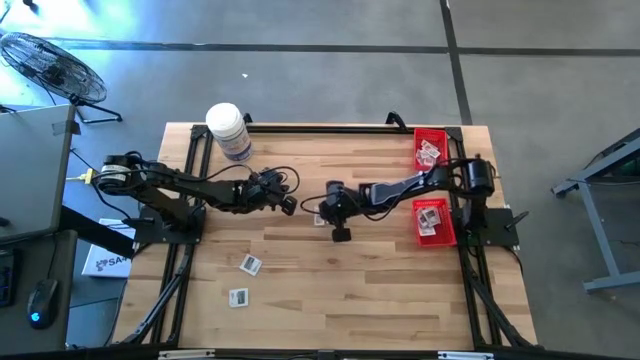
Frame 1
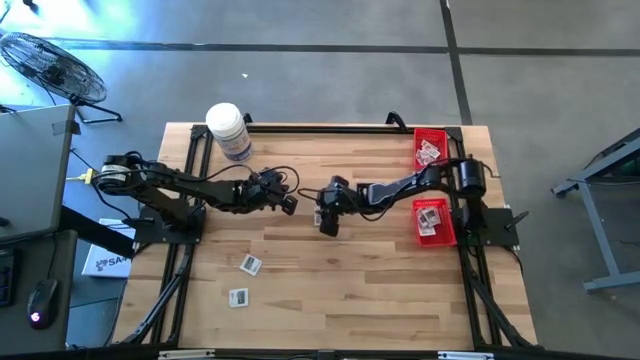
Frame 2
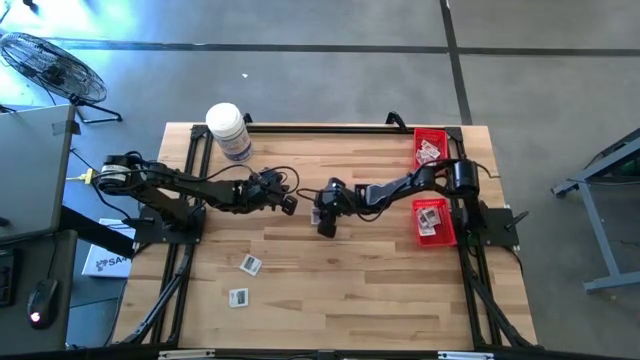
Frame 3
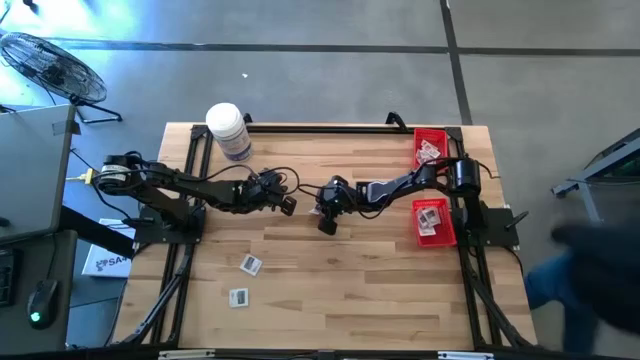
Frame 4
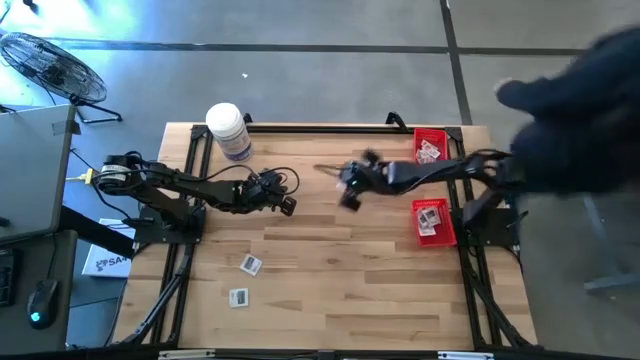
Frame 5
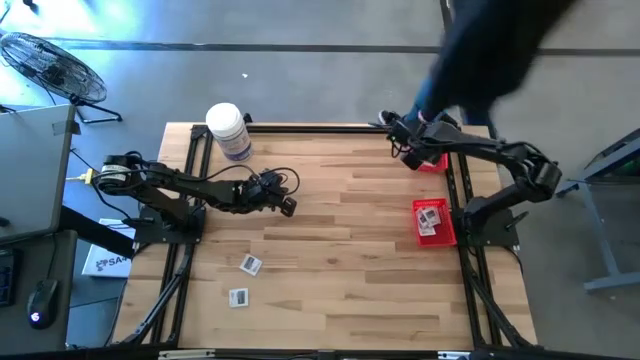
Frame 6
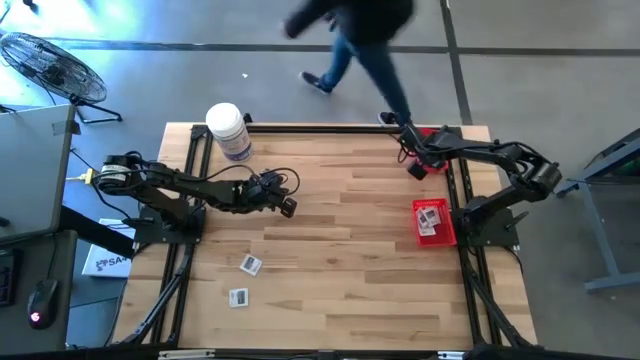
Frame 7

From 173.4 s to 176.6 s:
Task: Pick & Place First Aid Supplies
Put the ointment pack into the top basket

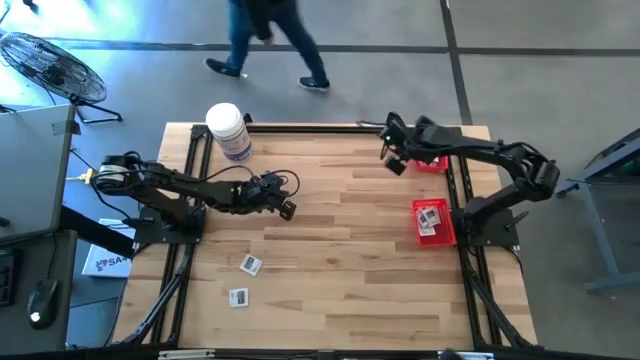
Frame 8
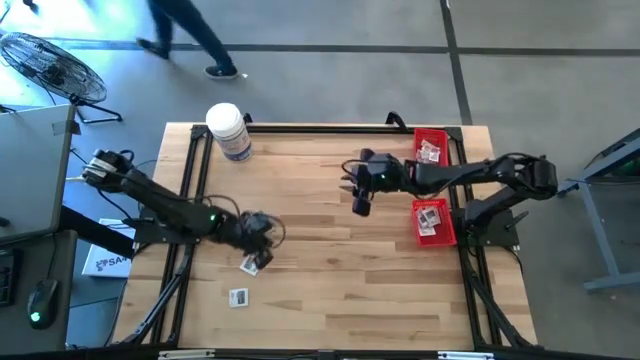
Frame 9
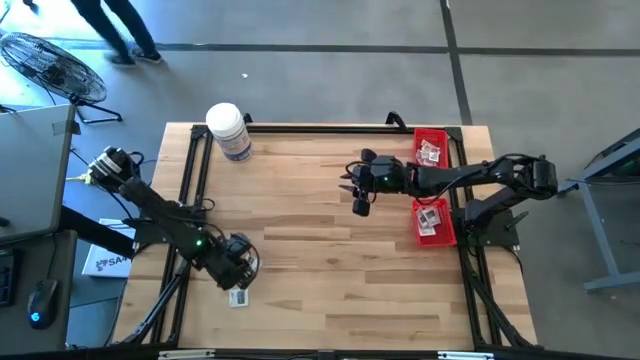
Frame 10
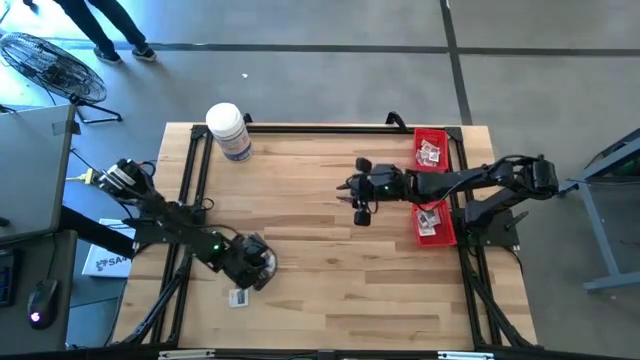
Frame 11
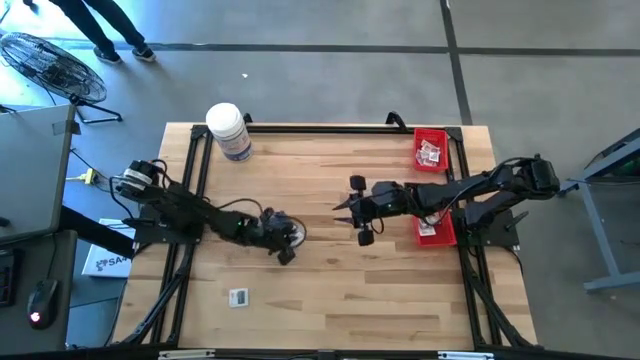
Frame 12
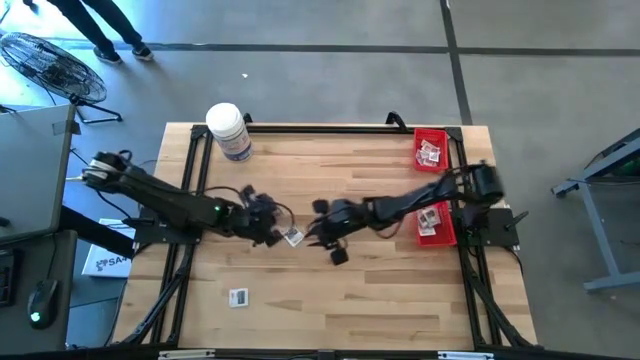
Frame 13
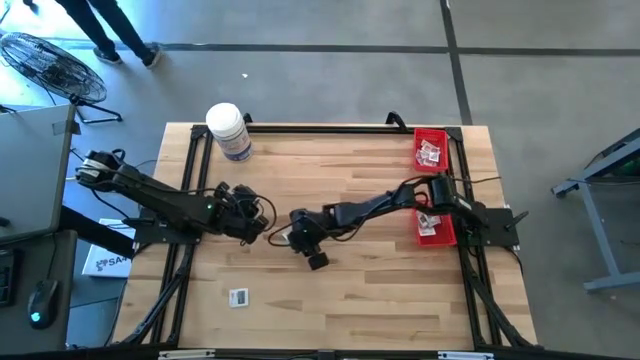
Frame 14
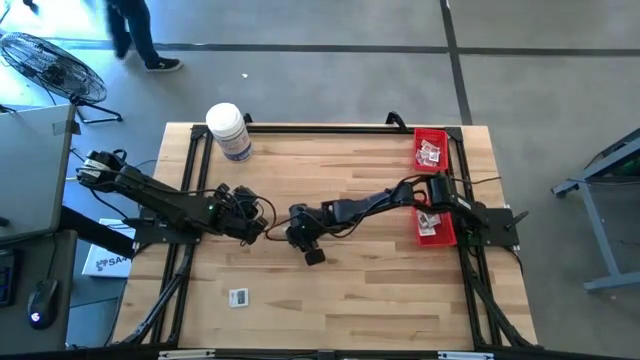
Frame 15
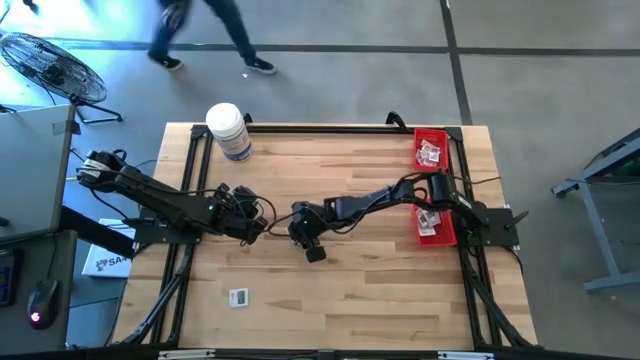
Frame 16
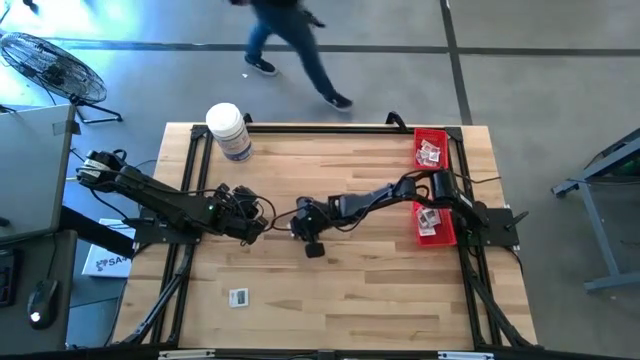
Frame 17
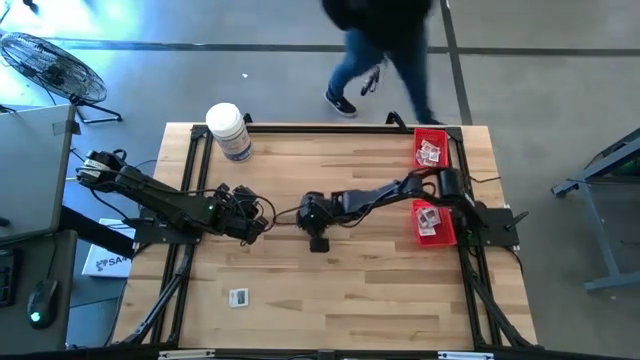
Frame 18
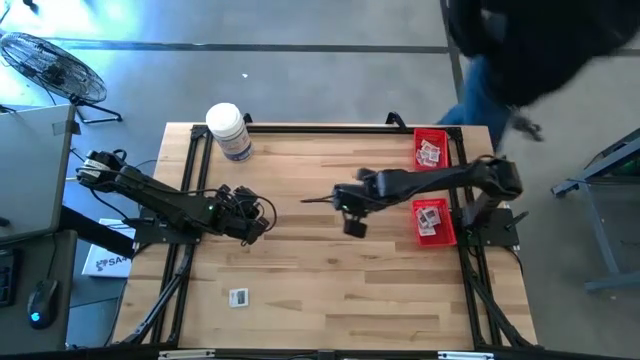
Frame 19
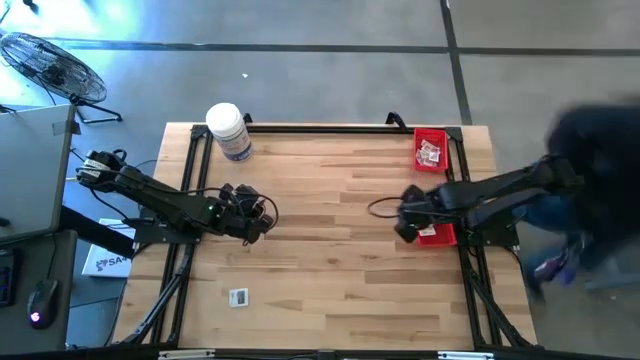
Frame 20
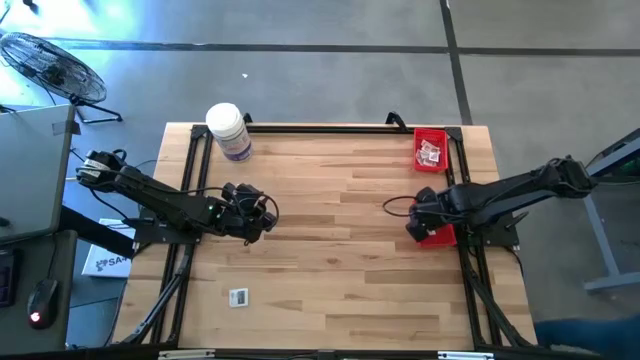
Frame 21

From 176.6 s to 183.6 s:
Put the towelette pack into the bottom basket

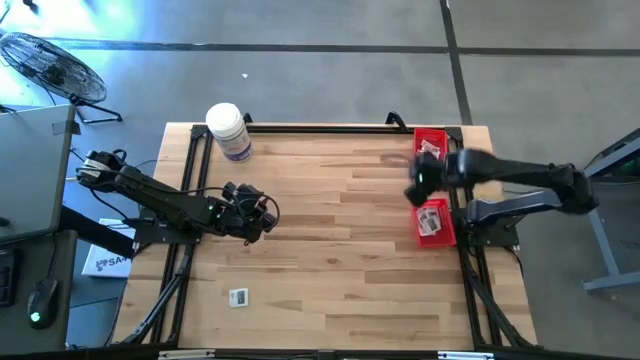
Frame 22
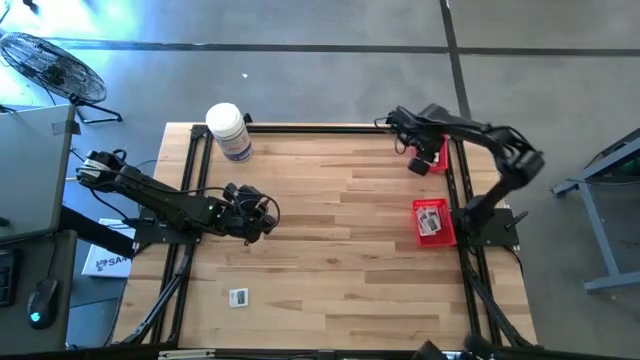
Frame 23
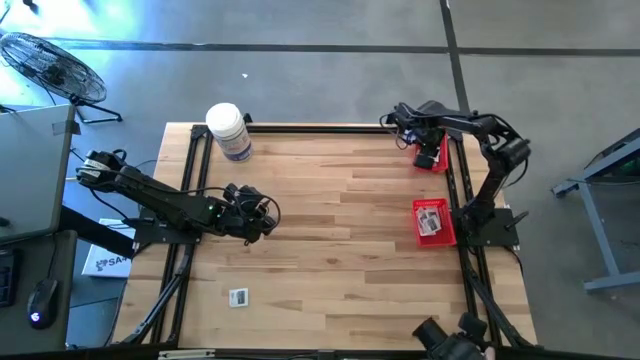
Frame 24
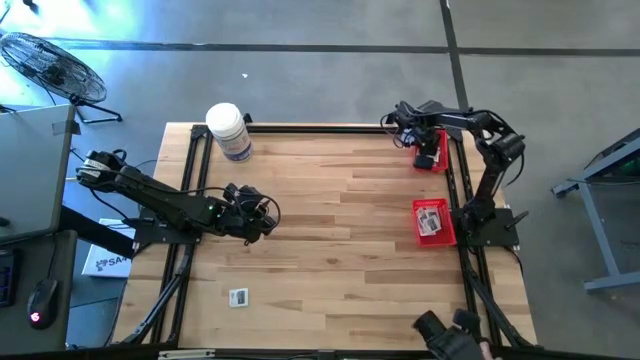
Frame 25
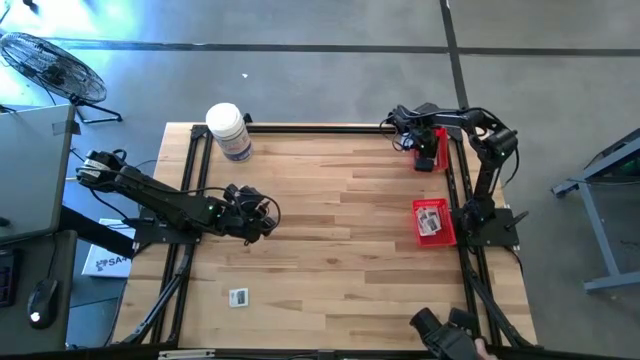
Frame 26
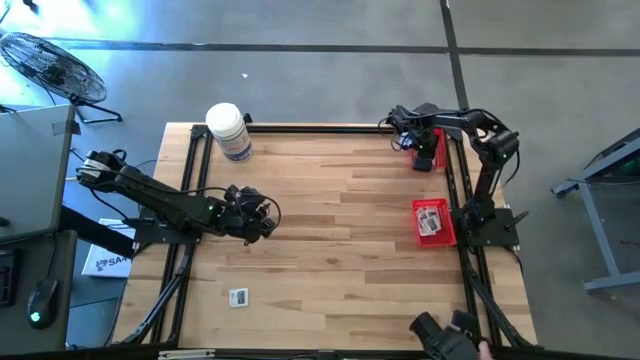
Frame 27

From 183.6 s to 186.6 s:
Adjust the ointment pack in the top basket

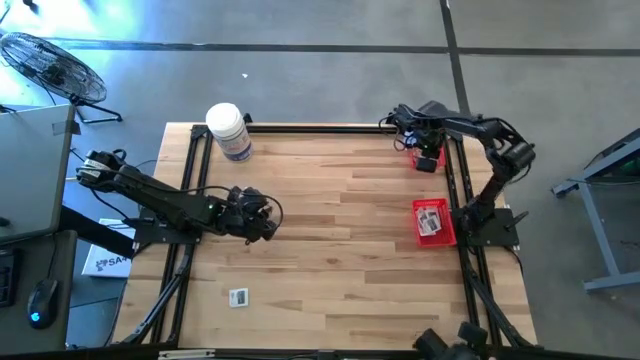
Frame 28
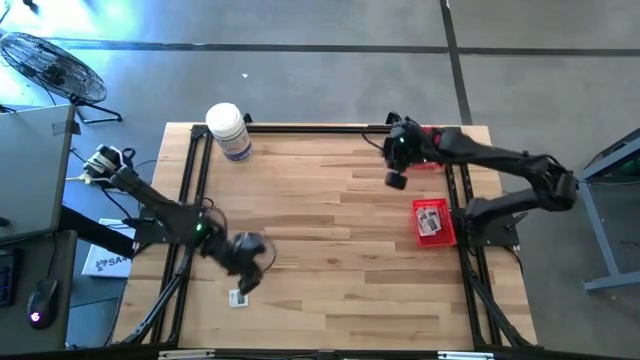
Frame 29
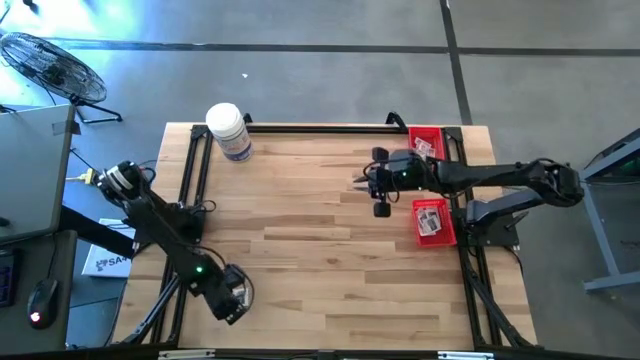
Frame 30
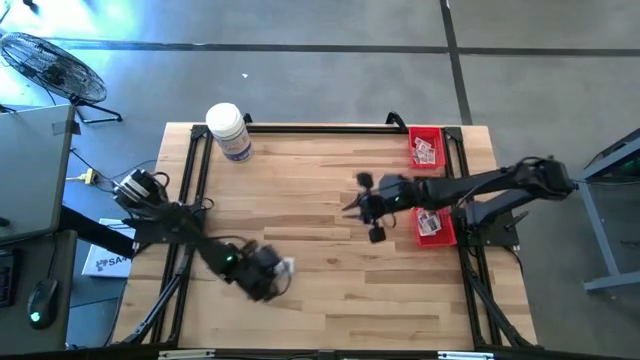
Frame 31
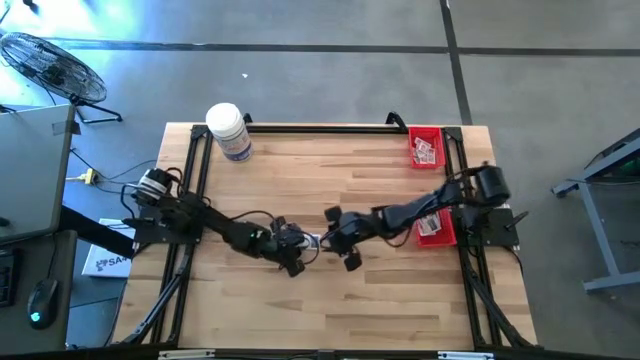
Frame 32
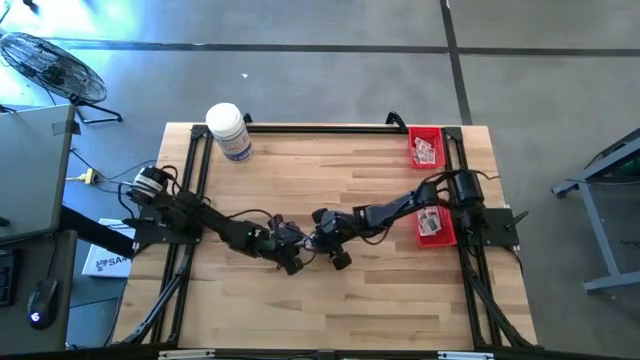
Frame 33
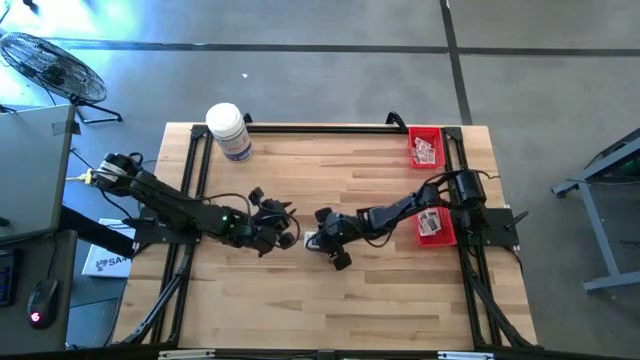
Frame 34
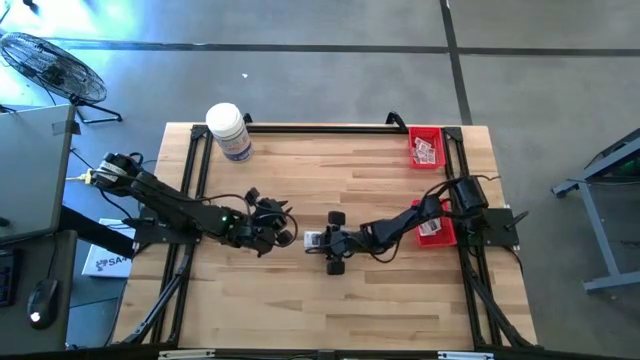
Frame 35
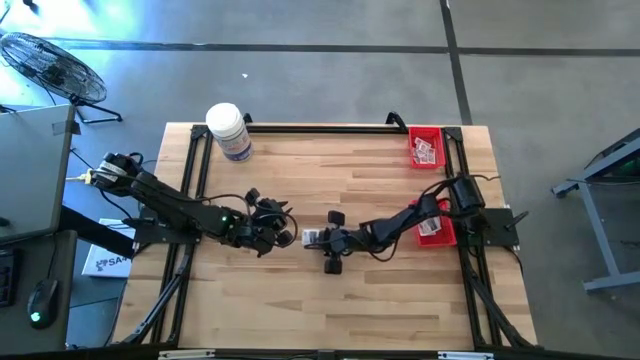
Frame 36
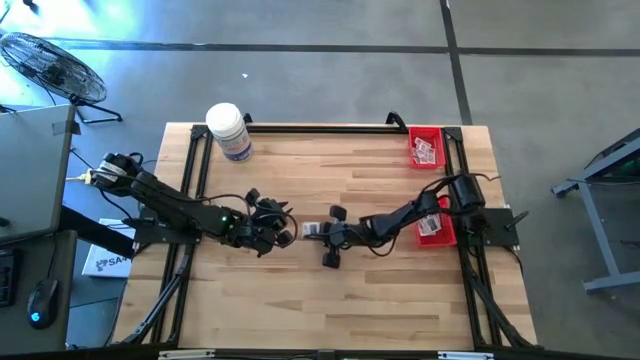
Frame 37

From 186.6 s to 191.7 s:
Put the towelette pack into the bottom basket

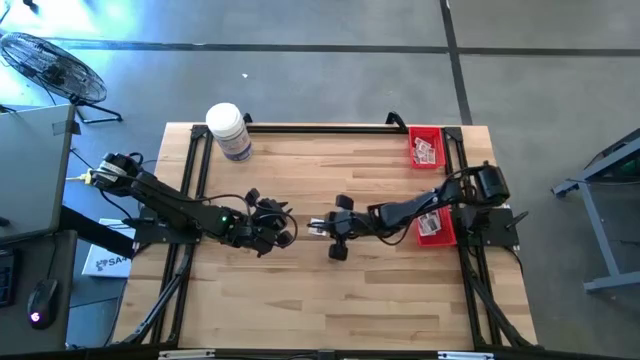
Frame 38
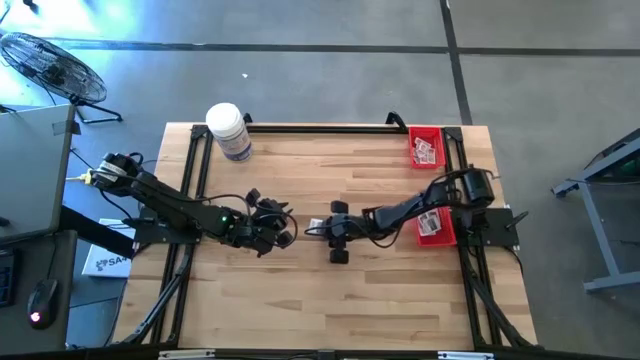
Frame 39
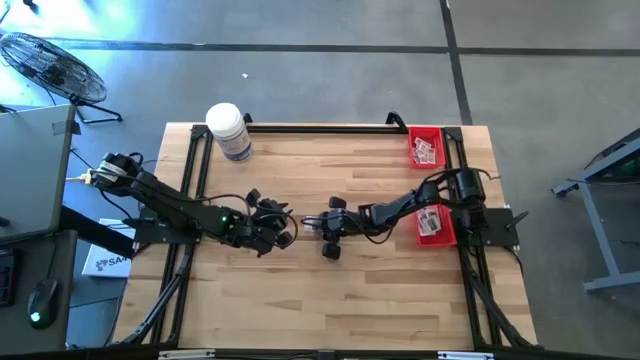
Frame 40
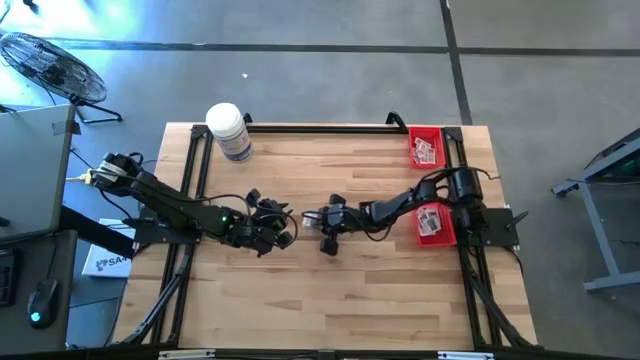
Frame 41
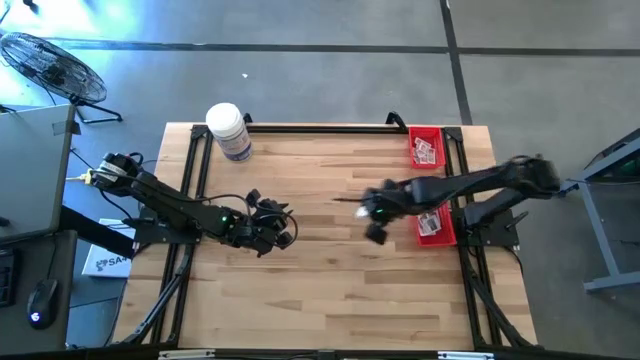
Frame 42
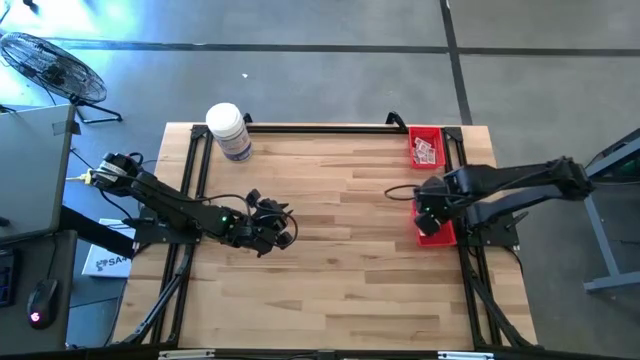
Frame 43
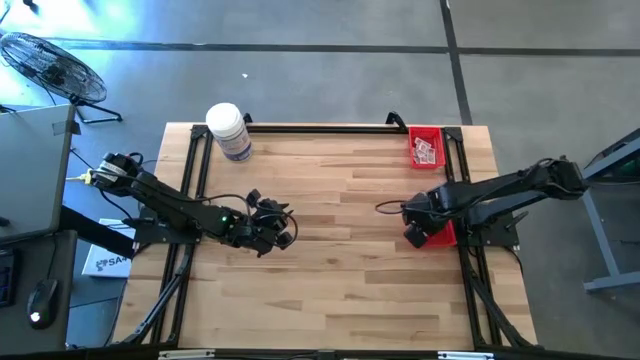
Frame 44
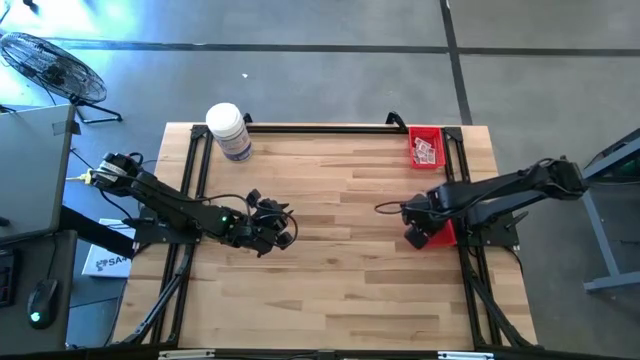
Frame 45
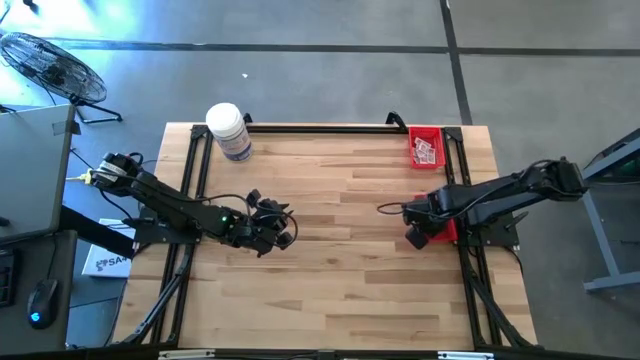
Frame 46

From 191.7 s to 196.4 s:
Put the towelette pack into the bottom basket
